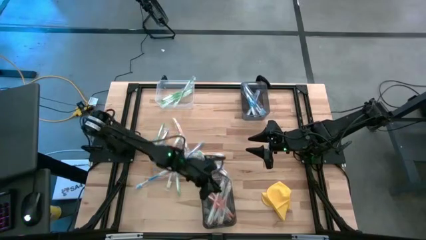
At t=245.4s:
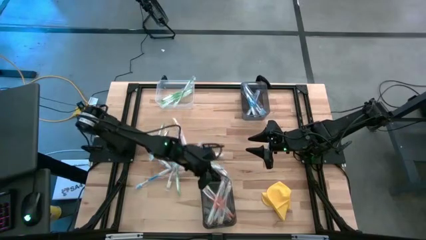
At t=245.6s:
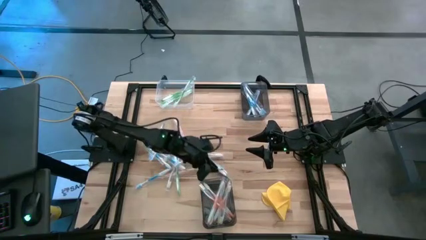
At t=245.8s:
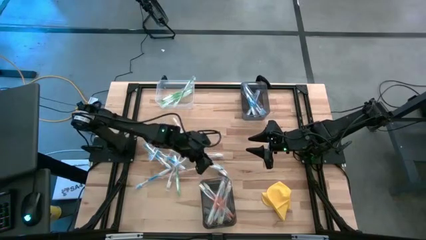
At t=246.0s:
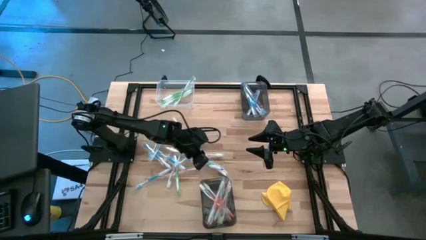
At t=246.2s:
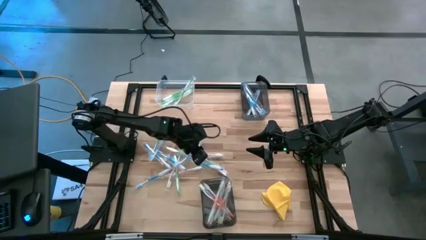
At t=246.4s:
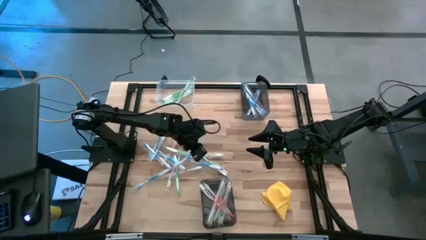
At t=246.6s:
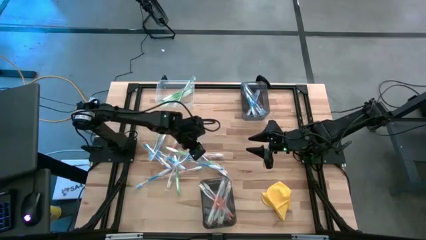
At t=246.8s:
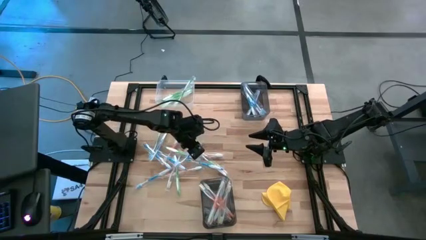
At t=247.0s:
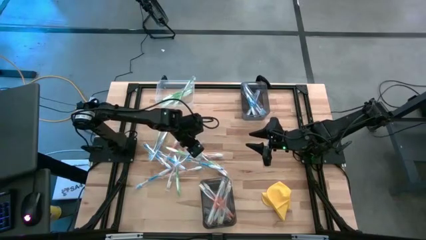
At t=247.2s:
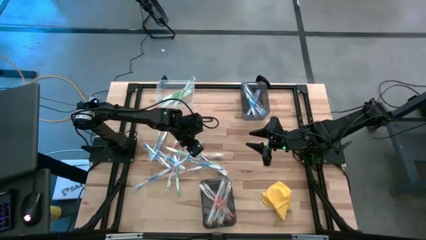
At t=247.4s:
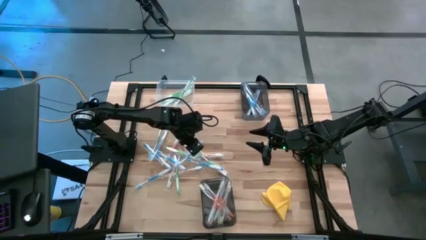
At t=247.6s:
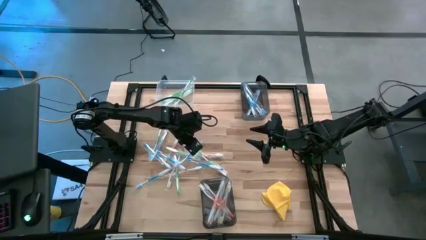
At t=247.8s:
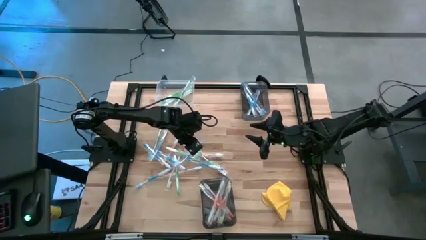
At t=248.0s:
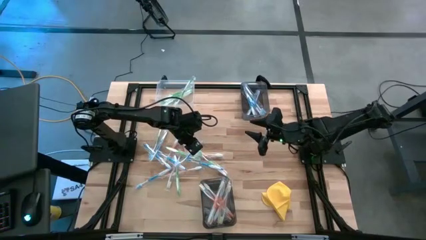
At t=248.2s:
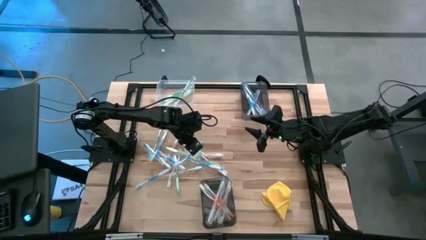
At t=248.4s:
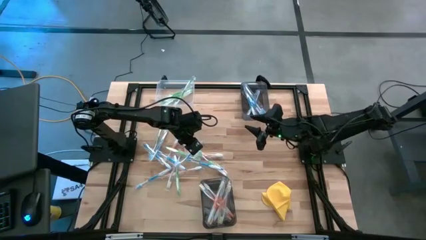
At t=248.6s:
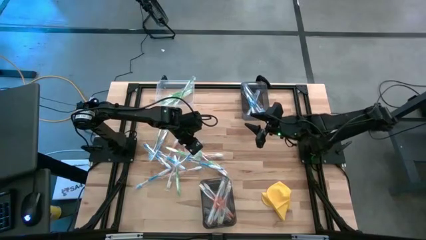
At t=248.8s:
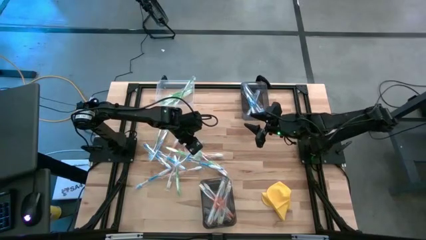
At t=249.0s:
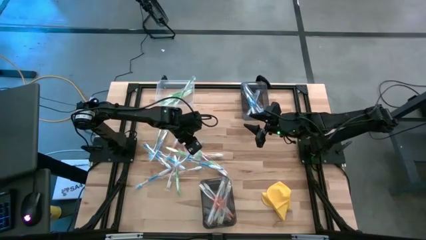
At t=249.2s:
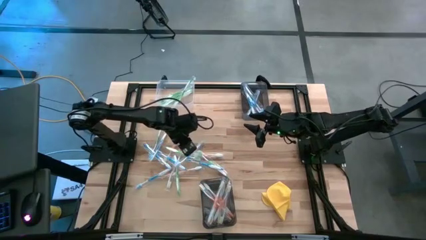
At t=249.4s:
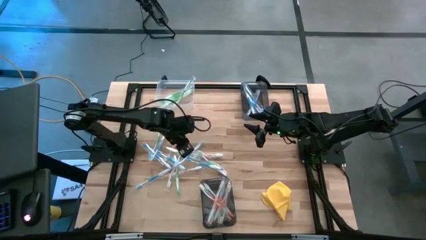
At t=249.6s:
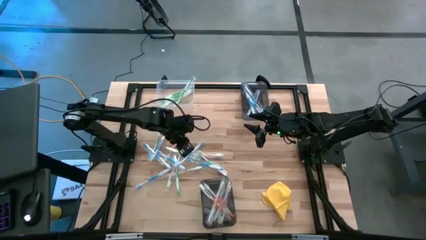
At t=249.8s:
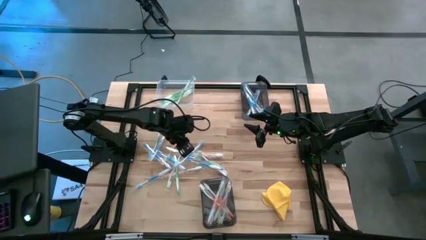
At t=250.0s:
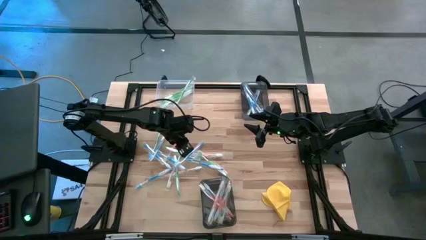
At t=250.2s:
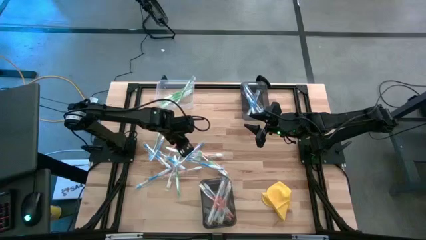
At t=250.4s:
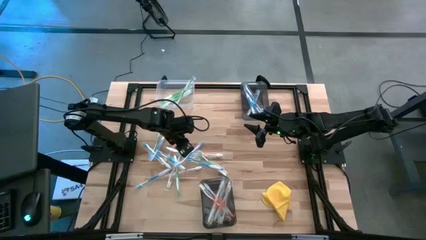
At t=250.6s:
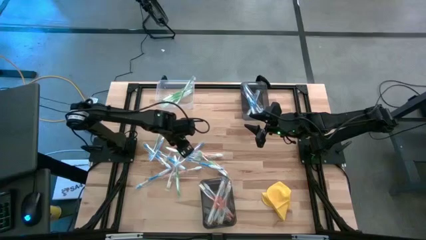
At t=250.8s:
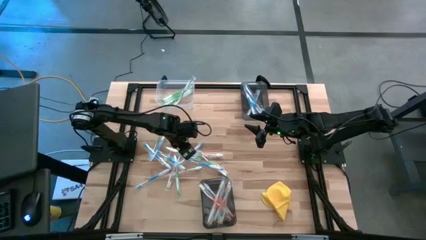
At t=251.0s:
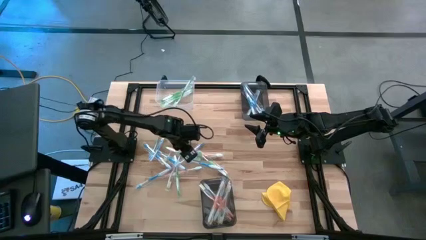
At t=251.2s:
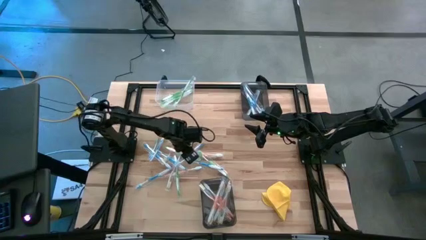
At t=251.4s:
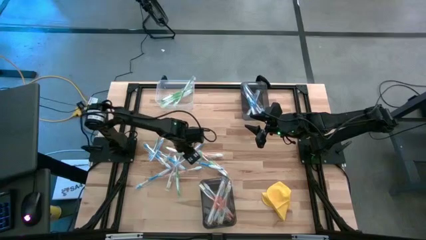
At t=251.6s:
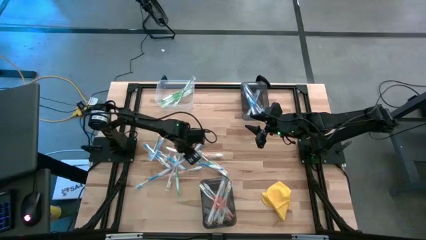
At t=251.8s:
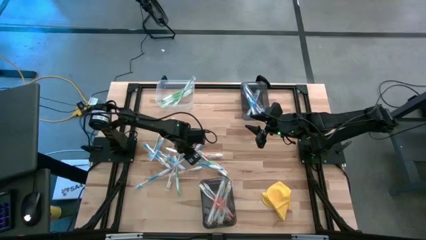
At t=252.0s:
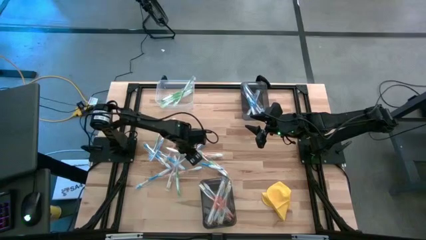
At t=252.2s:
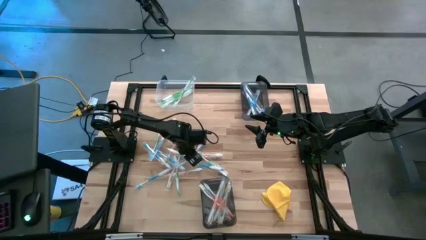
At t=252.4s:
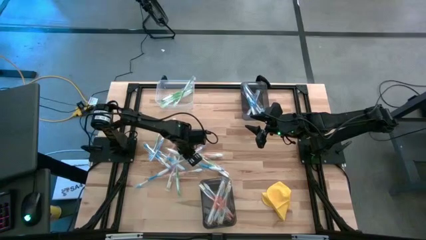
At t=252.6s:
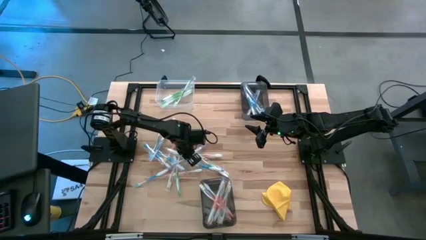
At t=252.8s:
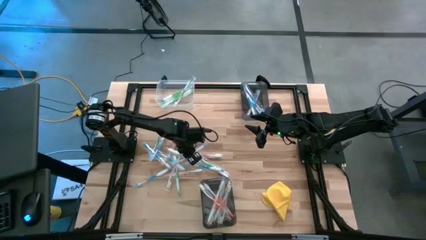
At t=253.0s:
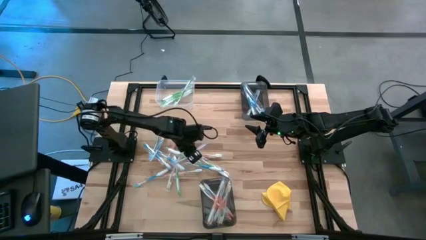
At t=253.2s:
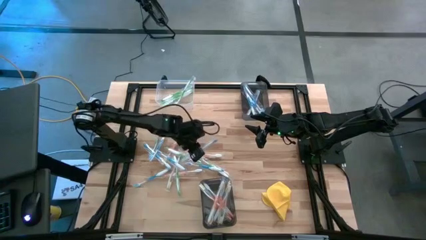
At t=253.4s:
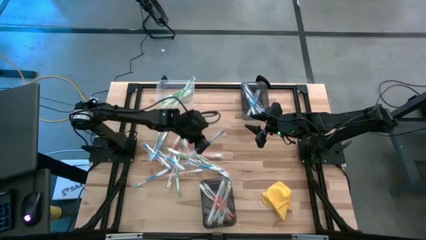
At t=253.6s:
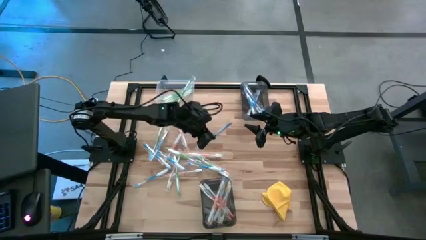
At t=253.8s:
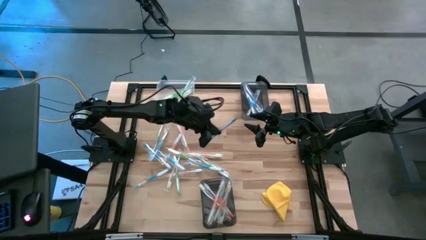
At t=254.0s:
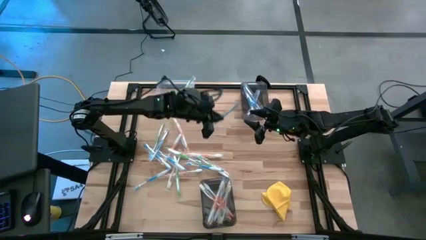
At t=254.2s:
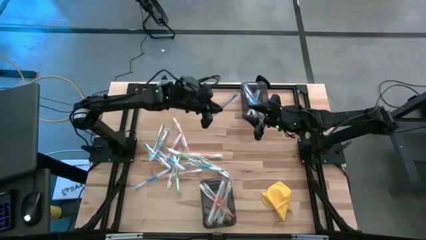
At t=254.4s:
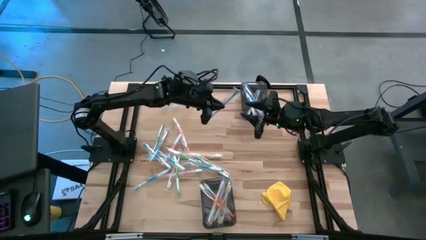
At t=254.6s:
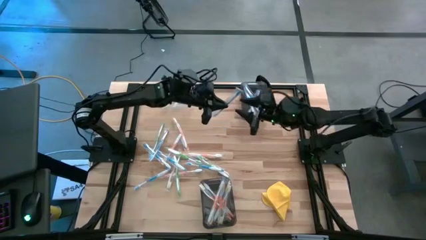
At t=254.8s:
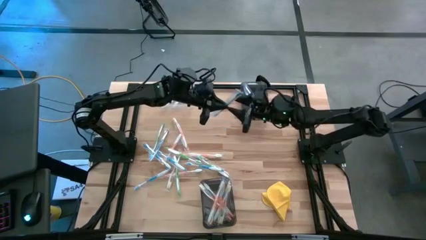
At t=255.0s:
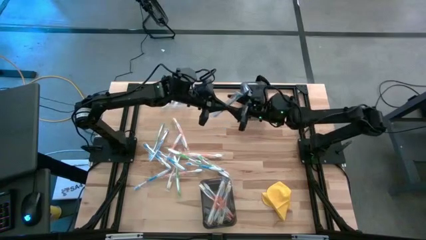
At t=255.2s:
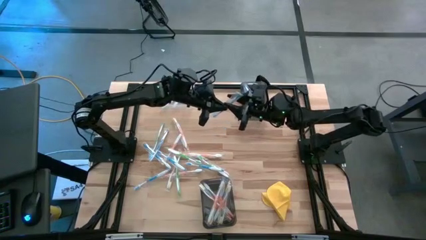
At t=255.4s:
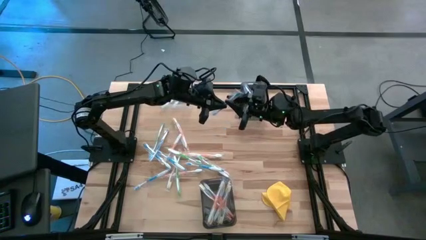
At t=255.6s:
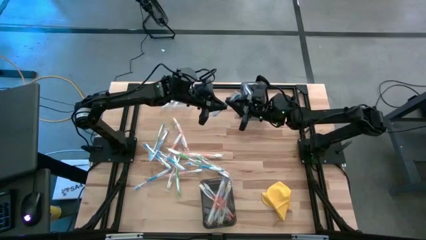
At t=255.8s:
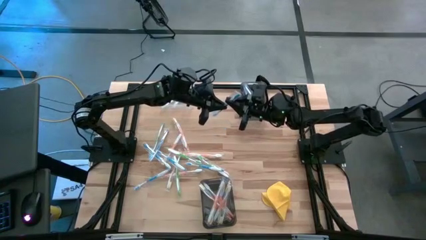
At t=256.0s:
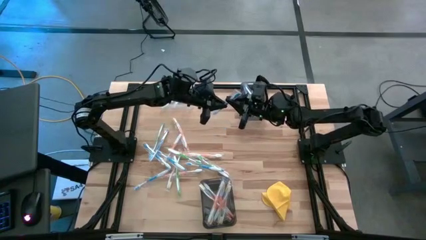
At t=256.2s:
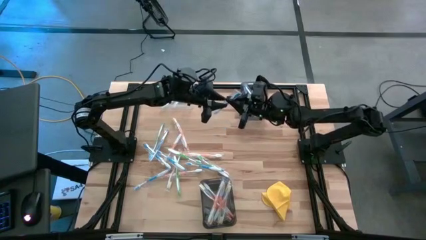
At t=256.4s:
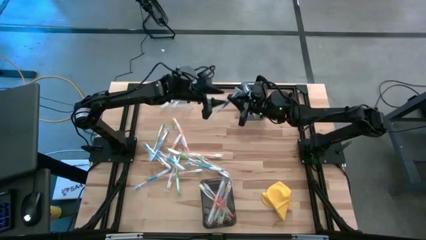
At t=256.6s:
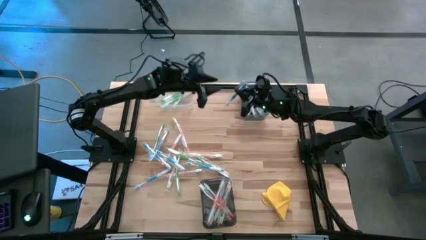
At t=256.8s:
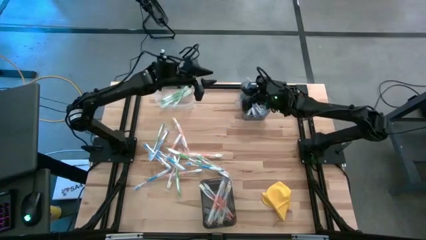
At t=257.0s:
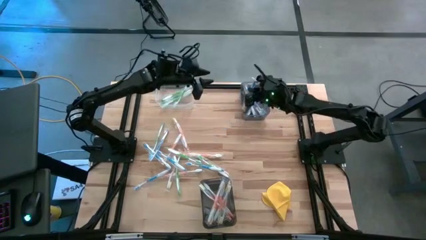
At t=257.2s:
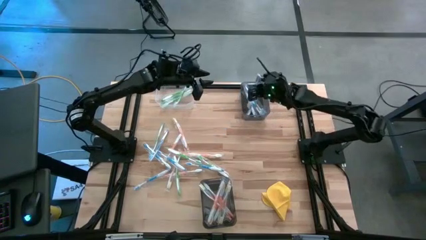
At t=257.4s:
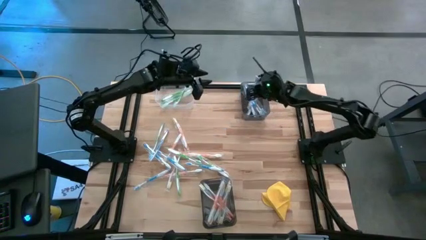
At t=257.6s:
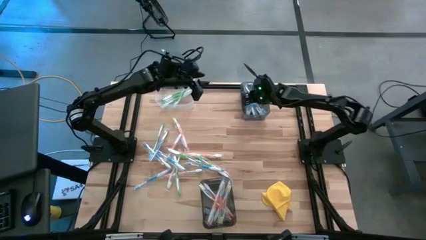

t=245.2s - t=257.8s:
Task: Pick & Place Toothbrushes
Put the blue toothbrush into the top black bin

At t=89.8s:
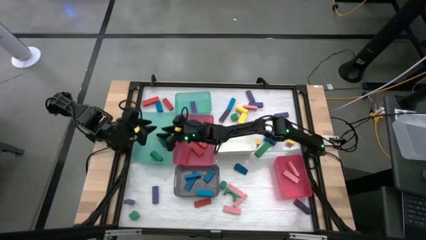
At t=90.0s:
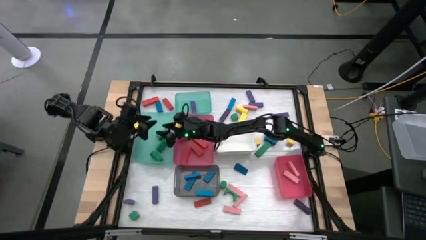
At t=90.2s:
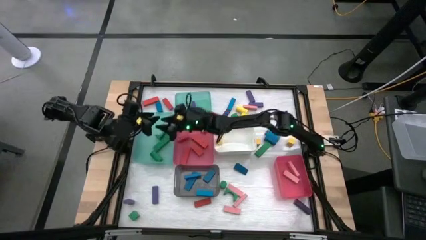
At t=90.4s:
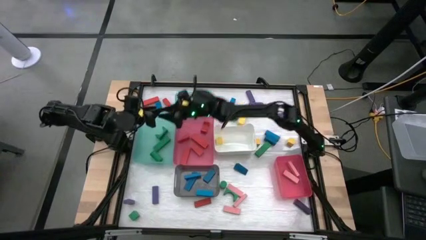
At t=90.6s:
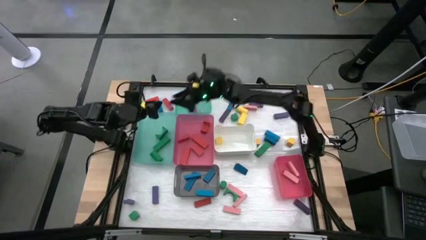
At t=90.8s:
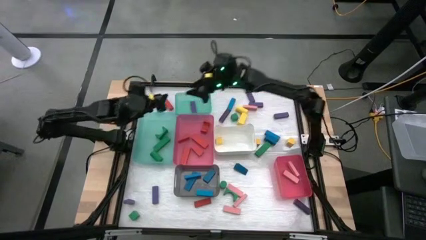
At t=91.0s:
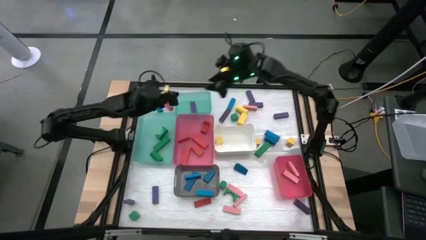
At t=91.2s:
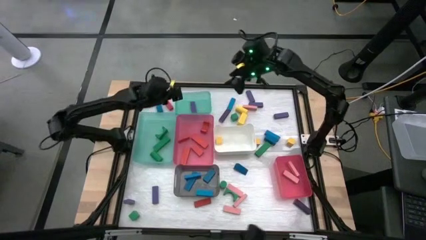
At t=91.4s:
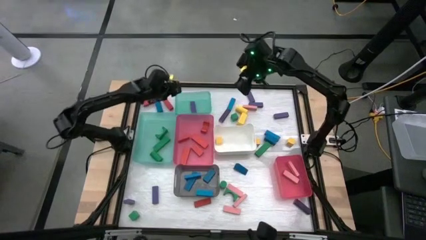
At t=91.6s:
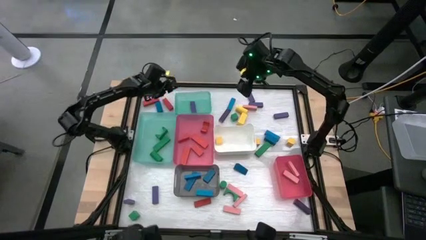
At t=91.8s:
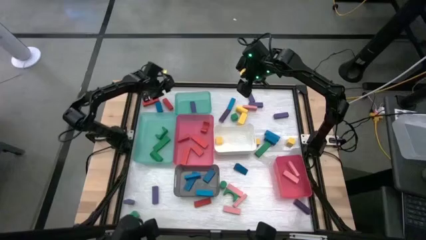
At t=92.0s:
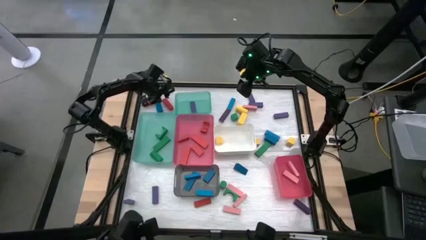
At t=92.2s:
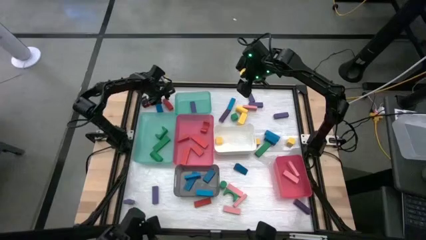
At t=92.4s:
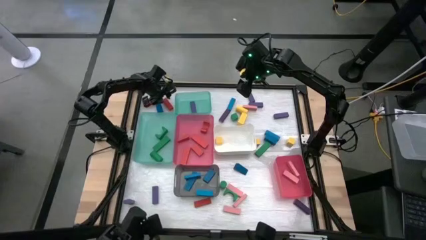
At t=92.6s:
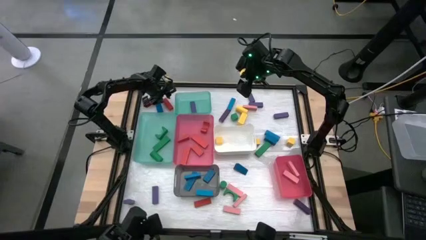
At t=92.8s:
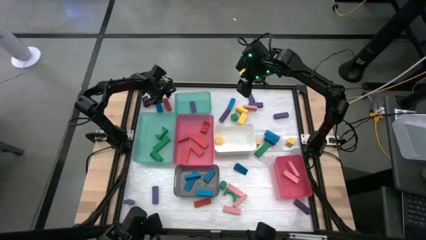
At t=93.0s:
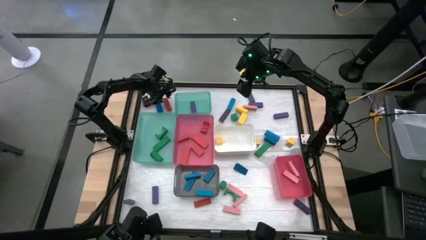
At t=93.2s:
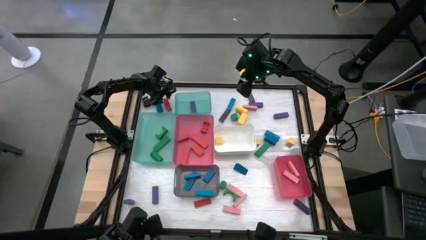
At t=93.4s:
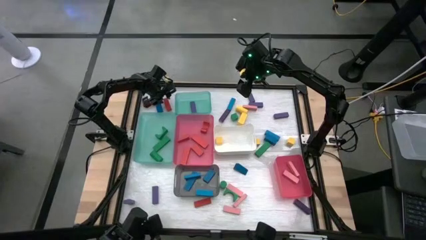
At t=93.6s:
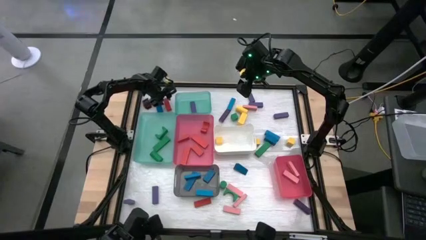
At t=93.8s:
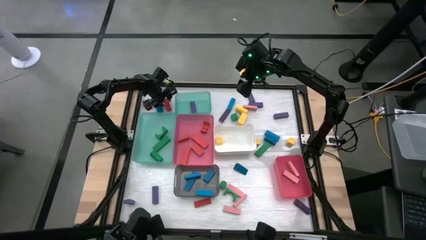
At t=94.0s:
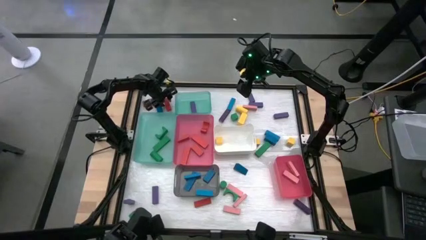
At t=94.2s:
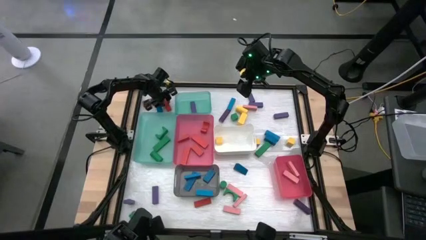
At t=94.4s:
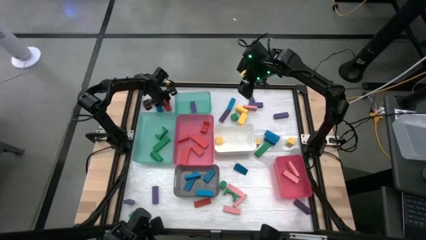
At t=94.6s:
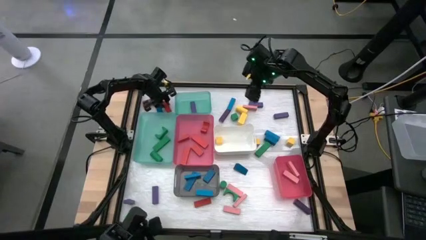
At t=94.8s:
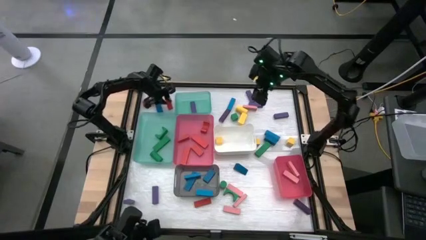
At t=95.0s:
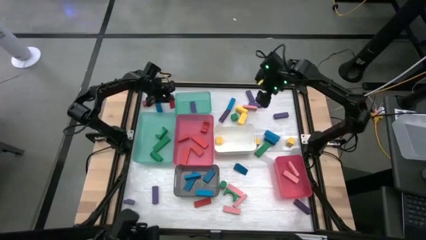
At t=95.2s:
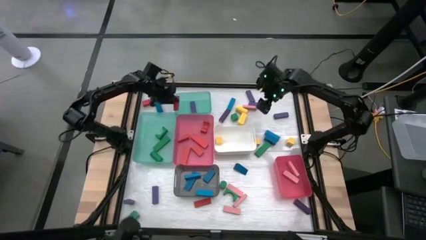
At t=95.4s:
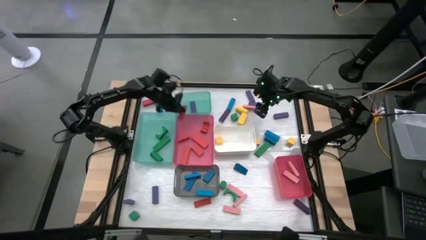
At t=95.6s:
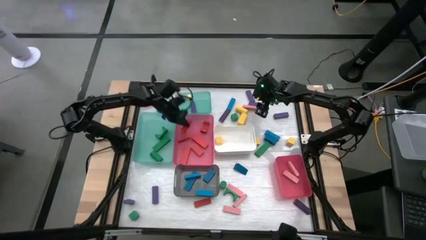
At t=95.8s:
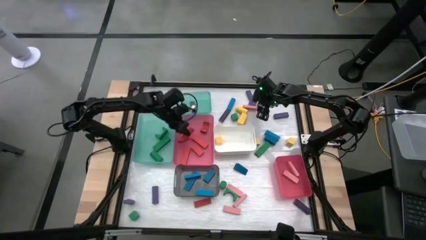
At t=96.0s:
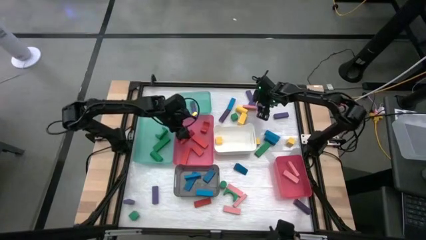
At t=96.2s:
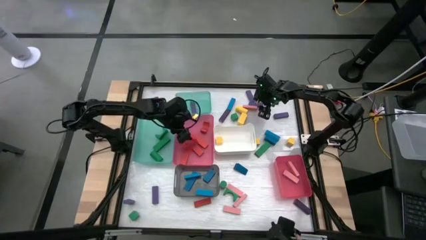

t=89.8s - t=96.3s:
Task: Sort blocks
Put the red block into the top pink bin
